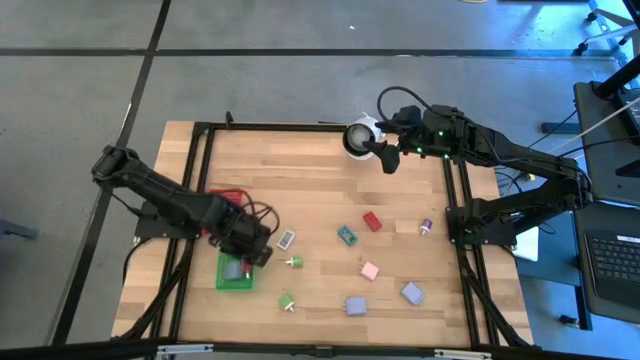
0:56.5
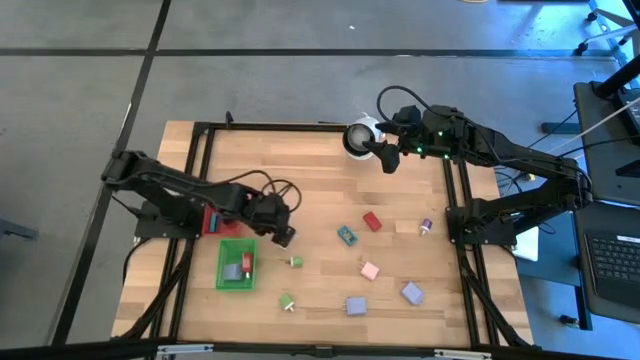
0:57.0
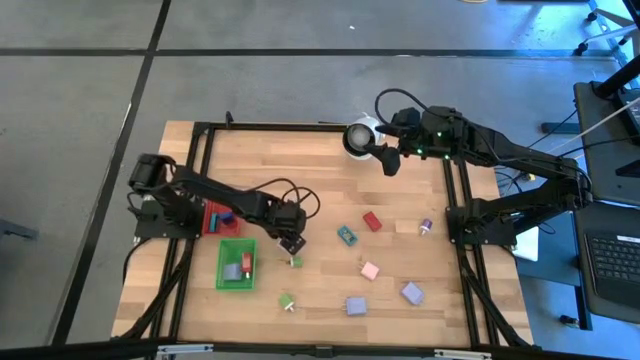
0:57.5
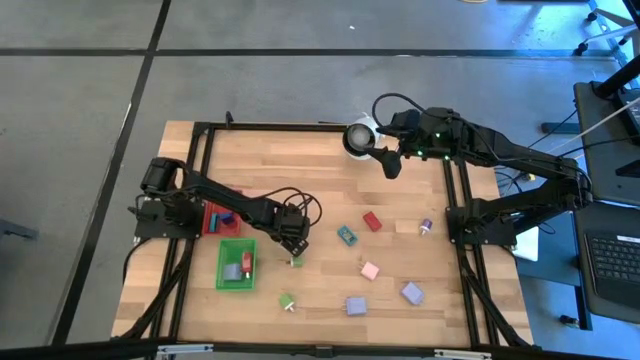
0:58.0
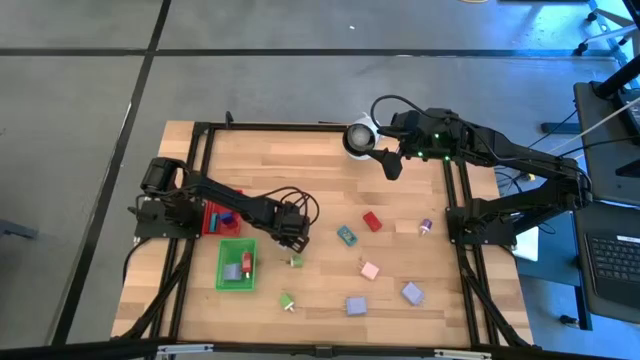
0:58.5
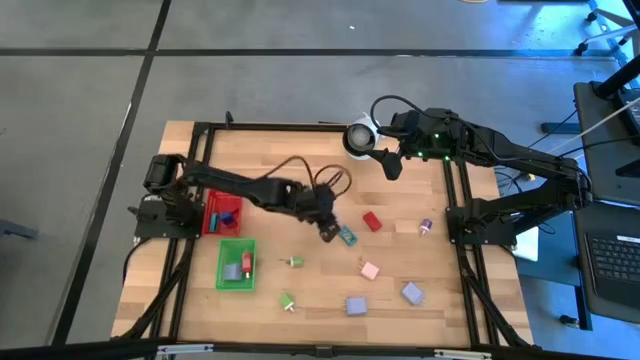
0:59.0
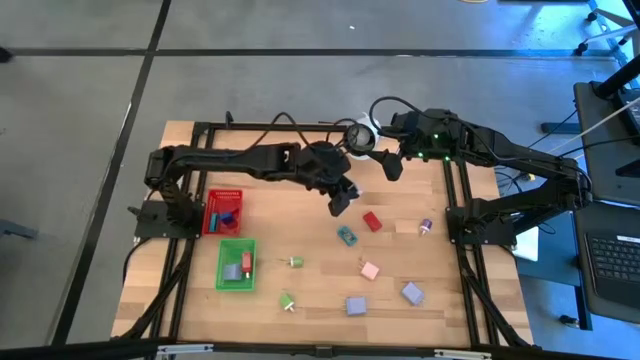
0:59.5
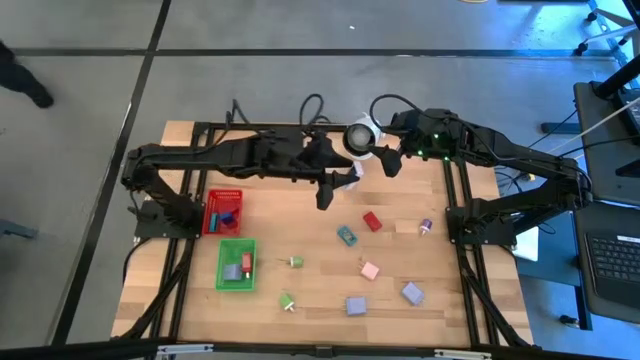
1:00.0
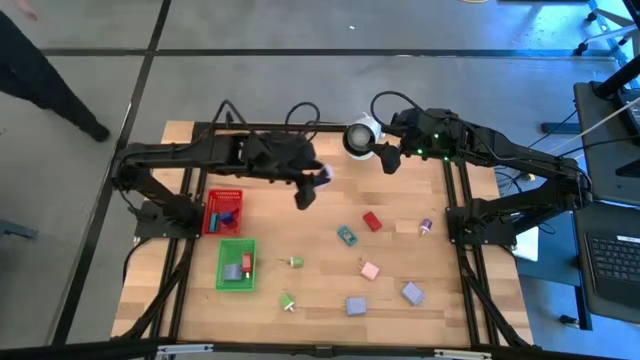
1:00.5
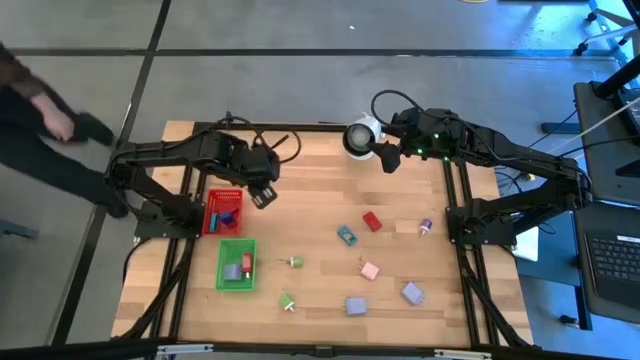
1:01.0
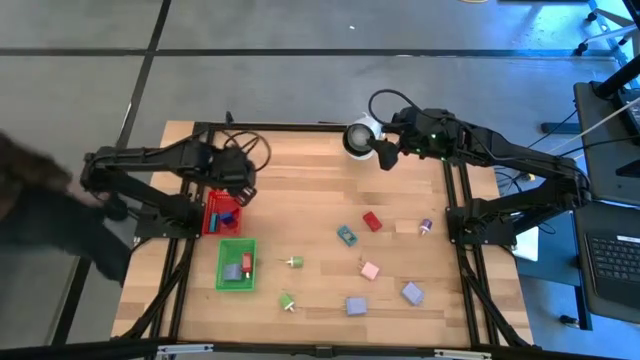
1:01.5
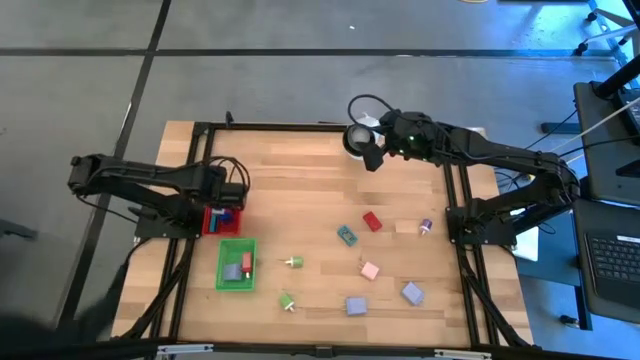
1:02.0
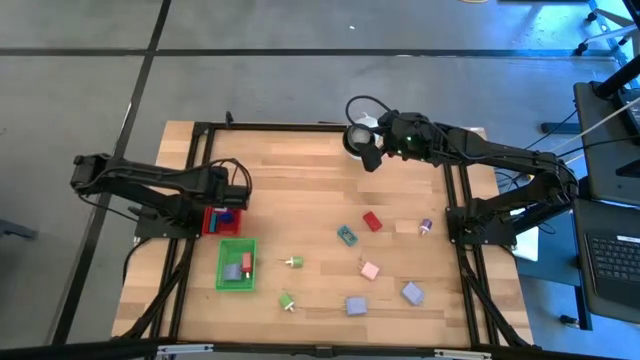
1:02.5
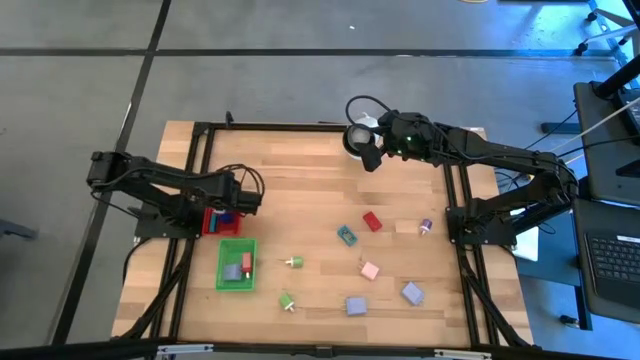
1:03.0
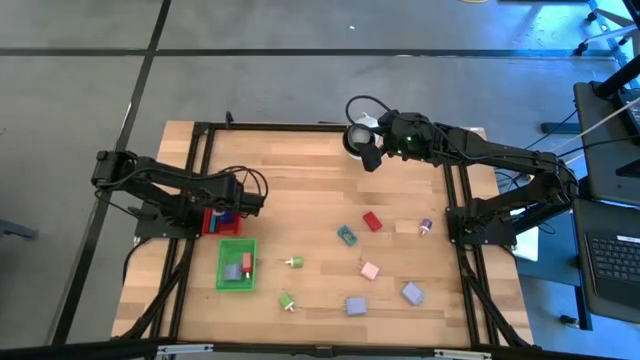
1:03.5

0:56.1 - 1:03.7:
Task: Pick & Place Office items
Put the white digital timer into the red bin

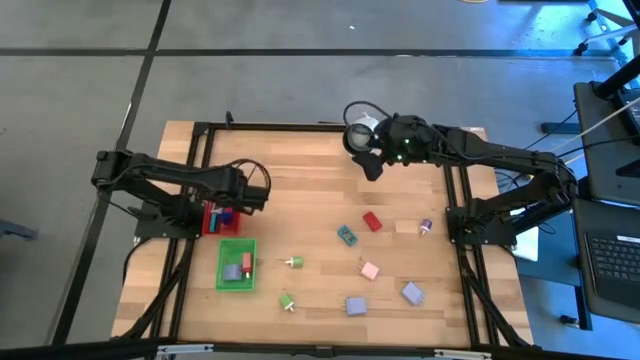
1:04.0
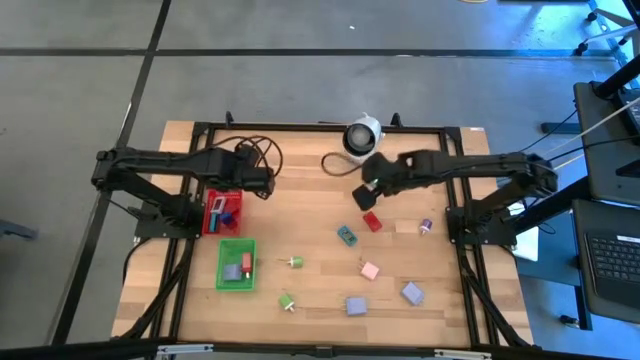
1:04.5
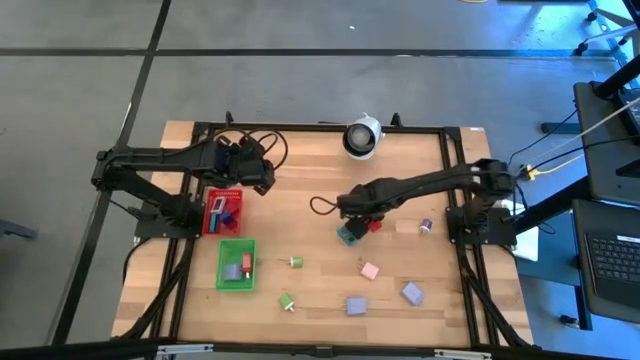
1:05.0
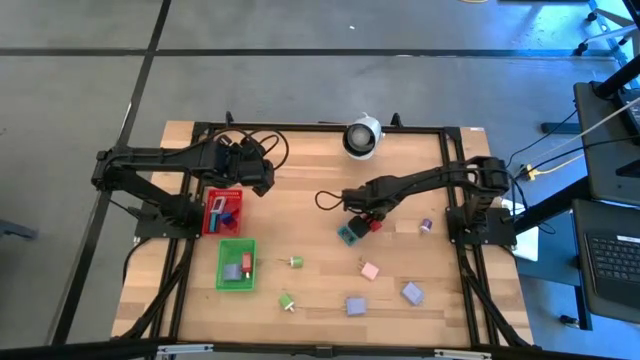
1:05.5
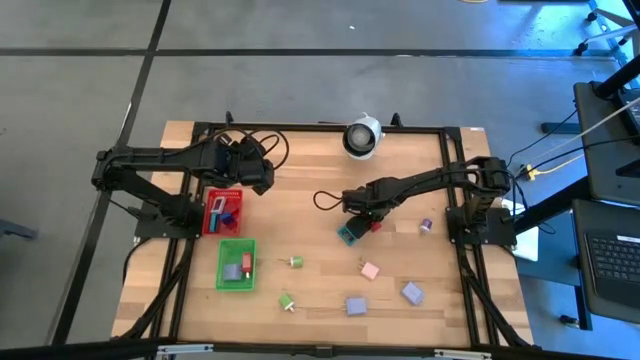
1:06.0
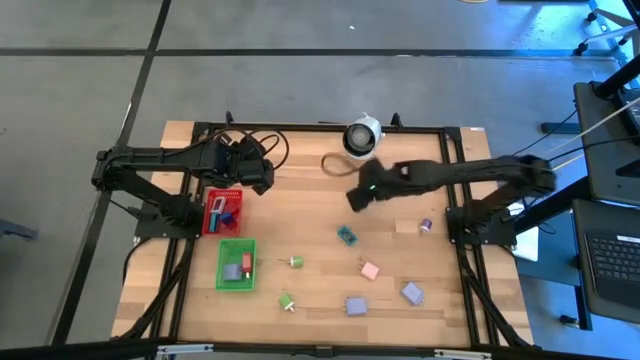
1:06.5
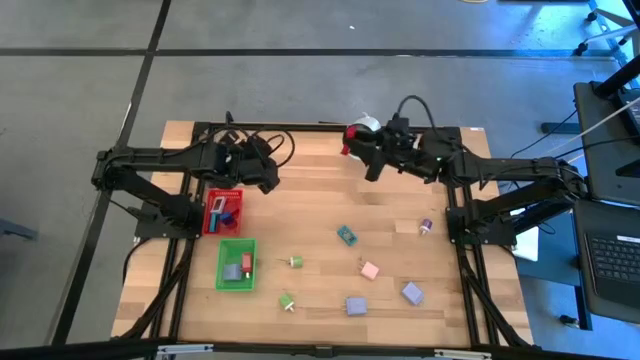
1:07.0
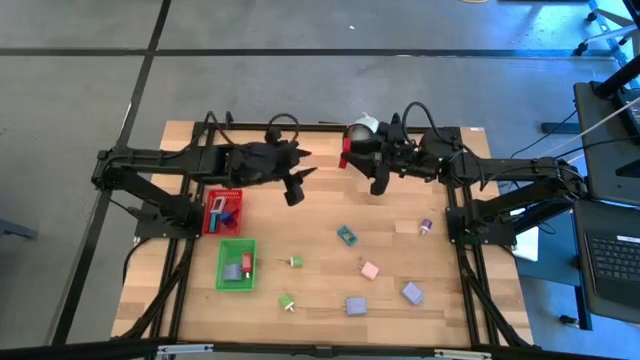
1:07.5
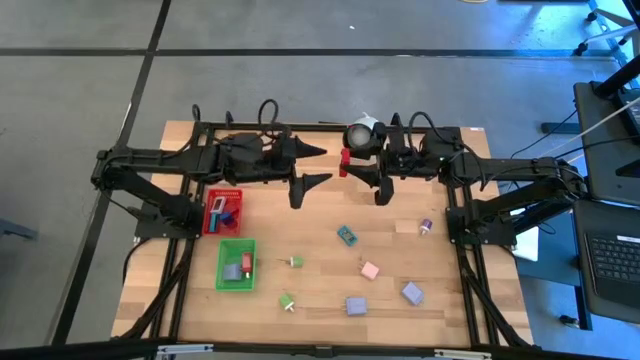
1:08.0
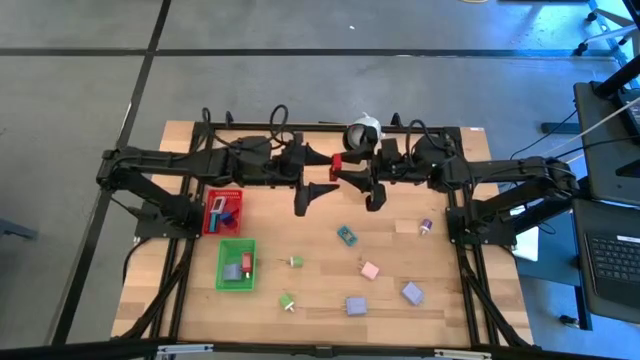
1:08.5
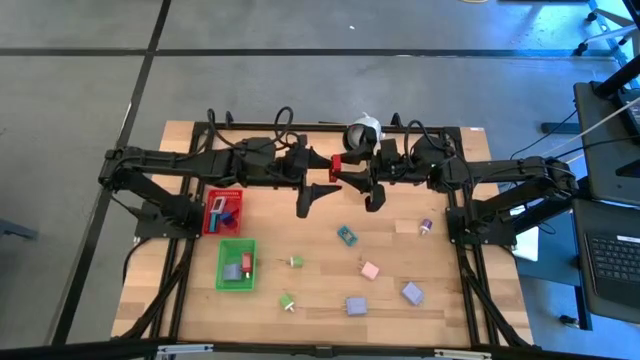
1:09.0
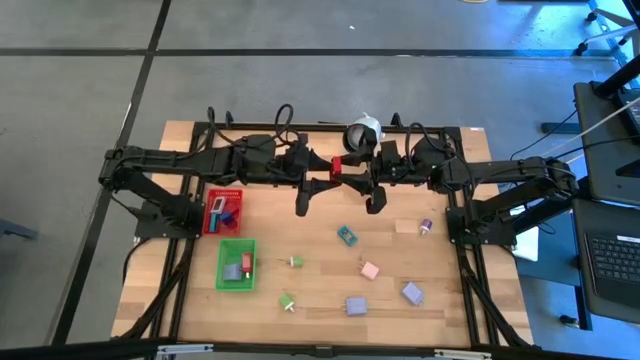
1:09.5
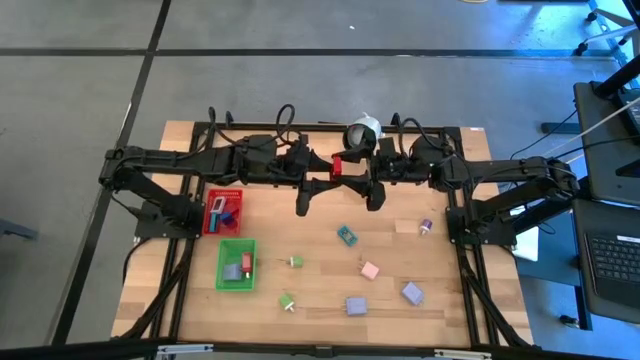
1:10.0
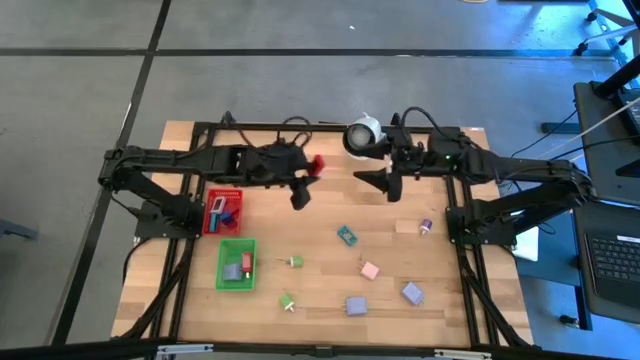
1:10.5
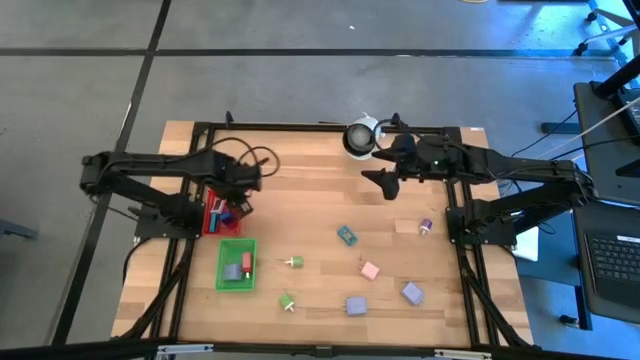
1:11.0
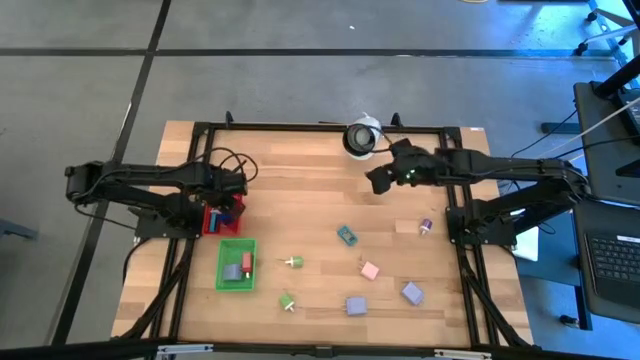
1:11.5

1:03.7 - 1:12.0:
Put the red digital timer into the red bin

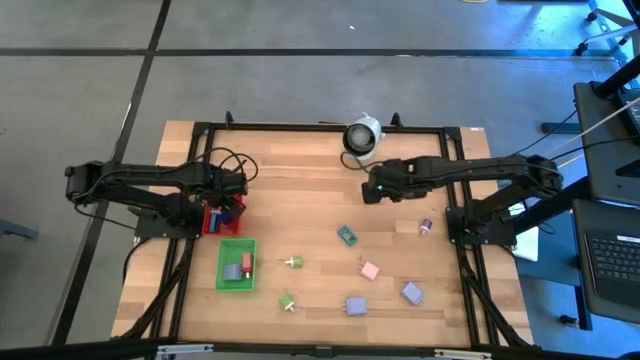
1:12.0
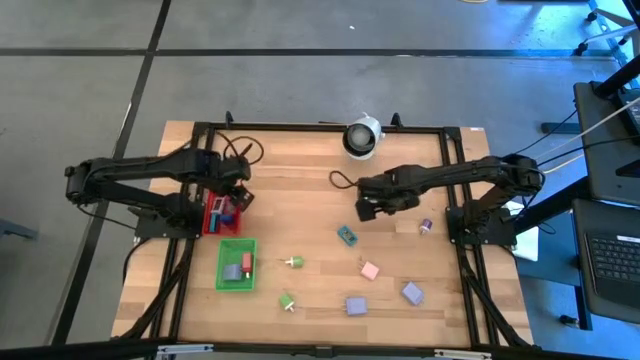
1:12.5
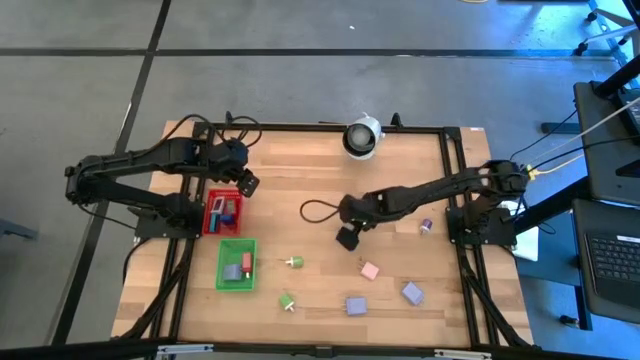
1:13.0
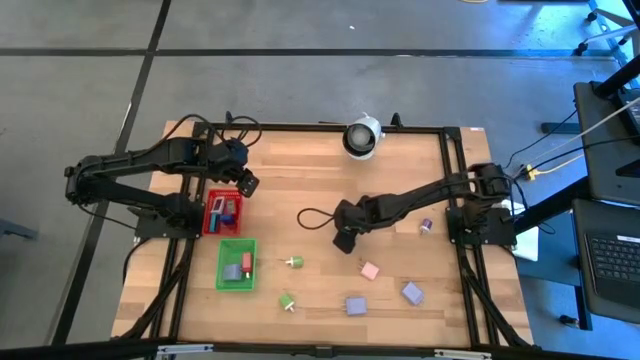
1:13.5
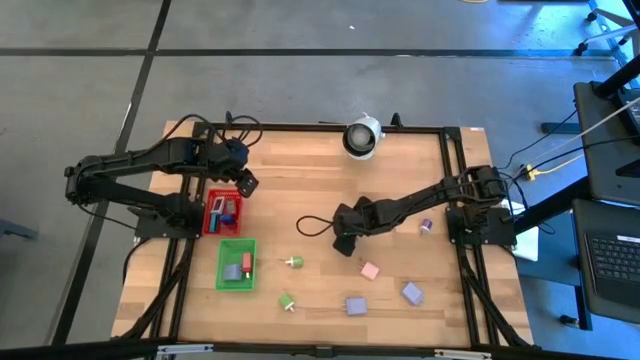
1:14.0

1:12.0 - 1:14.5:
Put the light blue digital timer into the red bin

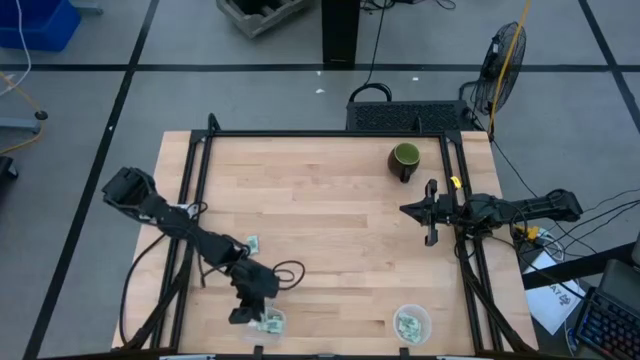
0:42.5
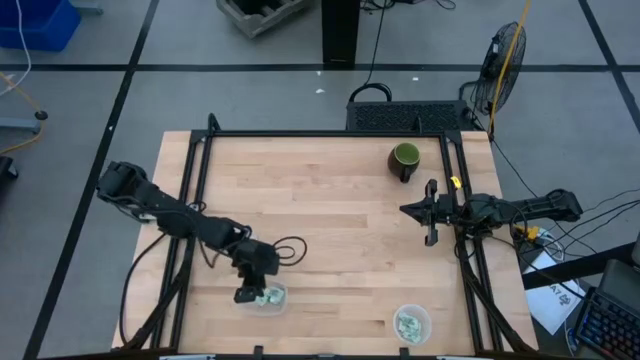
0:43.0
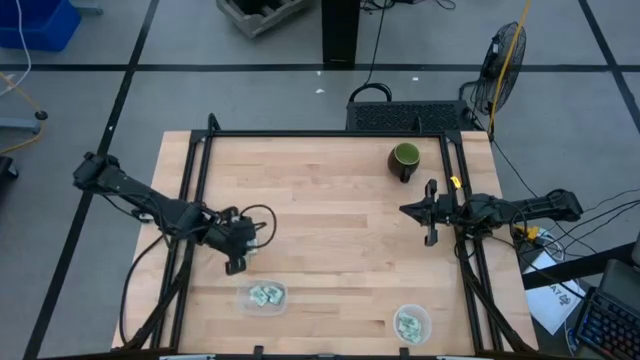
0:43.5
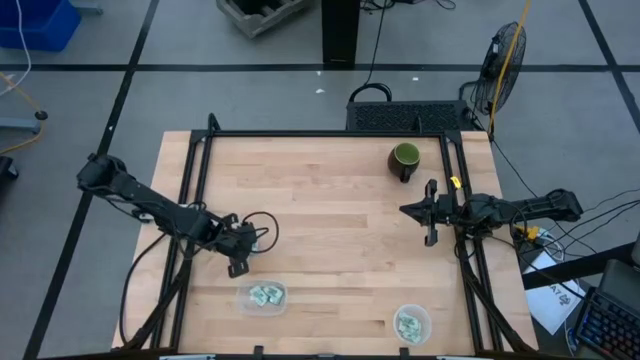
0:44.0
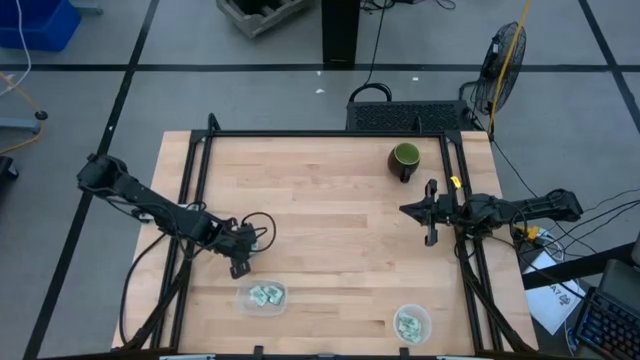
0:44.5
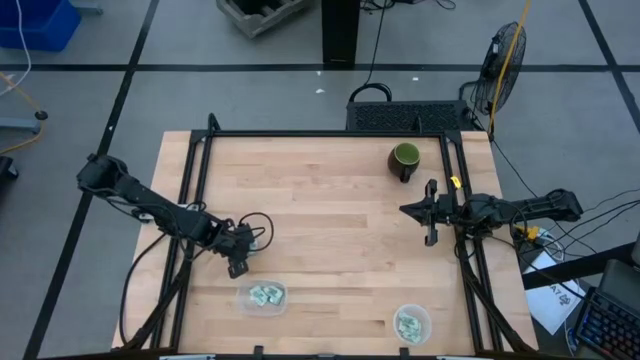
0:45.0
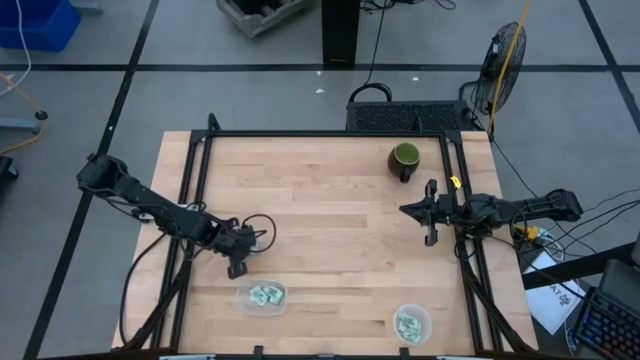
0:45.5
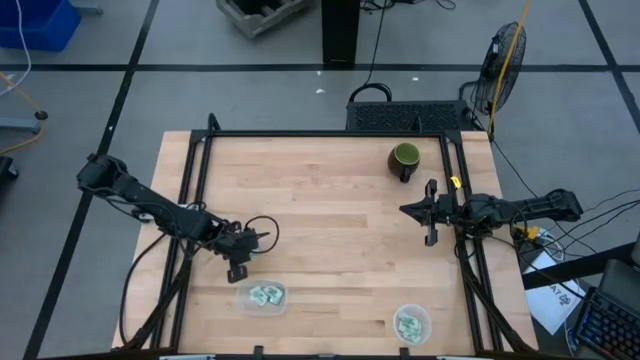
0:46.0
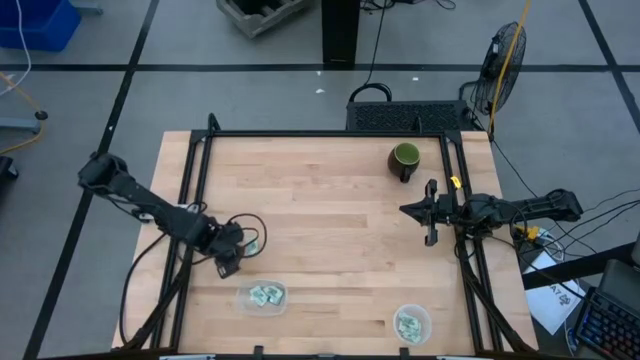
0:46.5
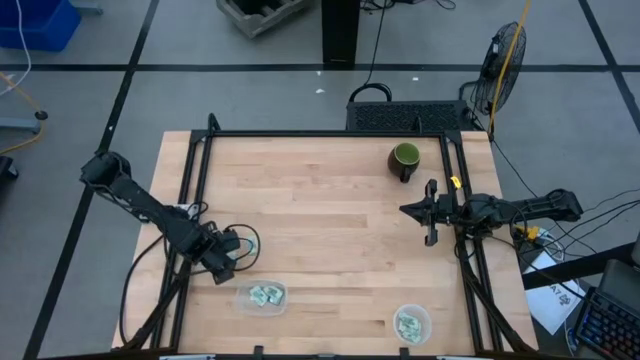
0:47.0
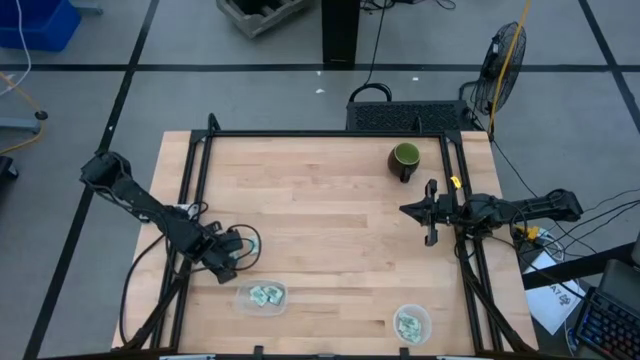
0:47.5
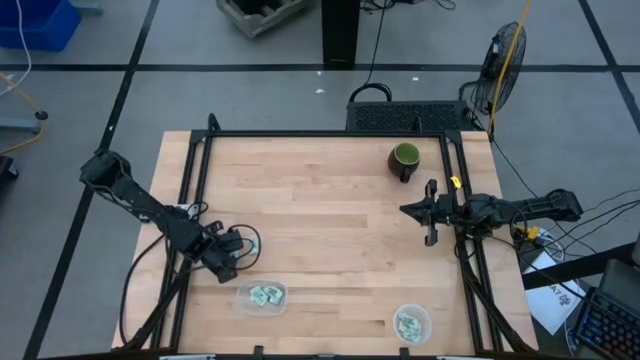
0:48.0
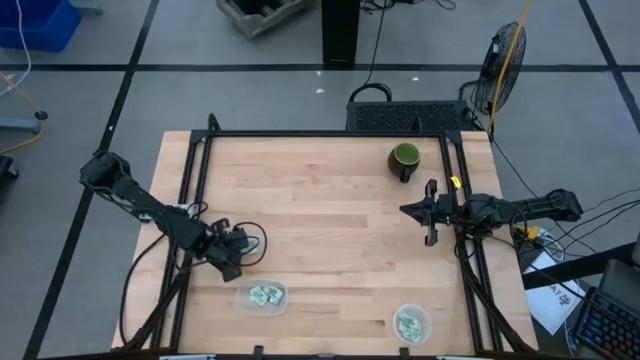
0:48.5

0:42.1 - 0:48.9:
Task: Pick and place Stevia / Truvia into bins
Put the stevia packet into the left transparent container
